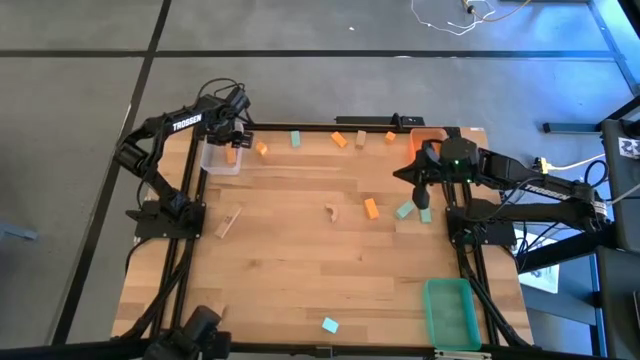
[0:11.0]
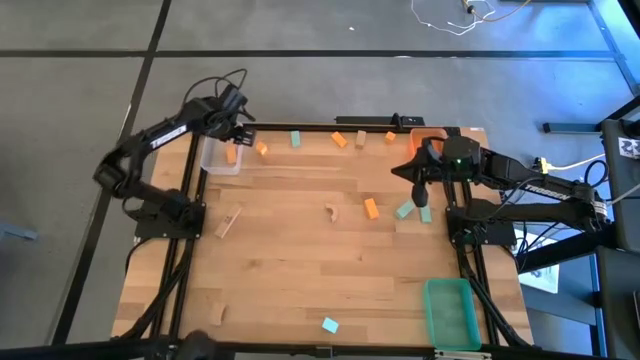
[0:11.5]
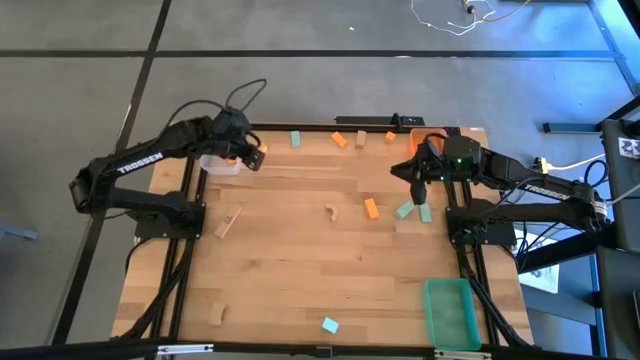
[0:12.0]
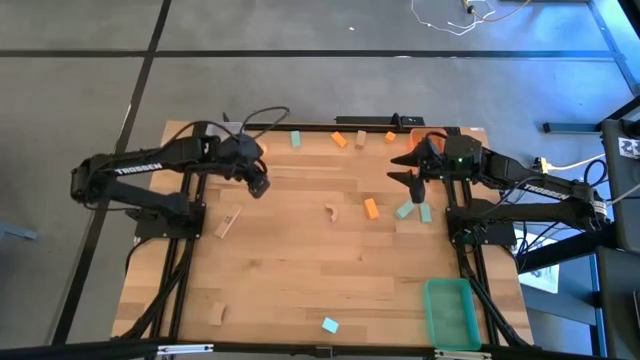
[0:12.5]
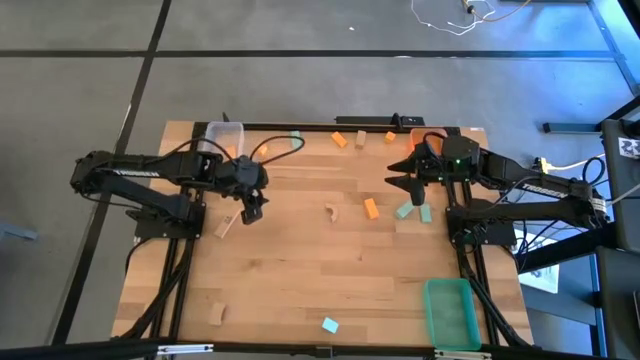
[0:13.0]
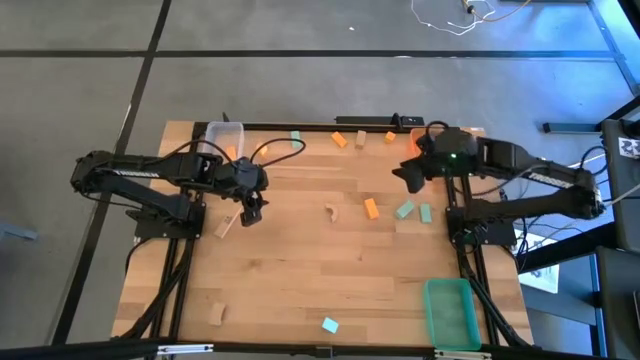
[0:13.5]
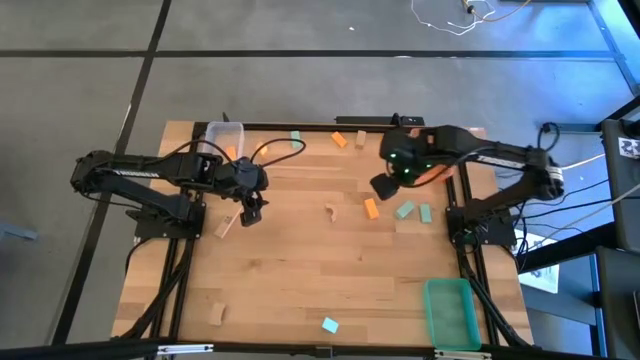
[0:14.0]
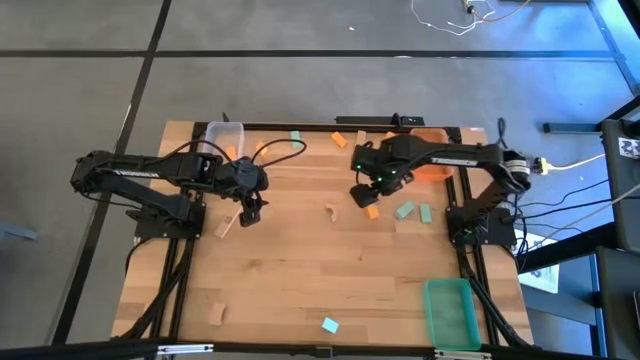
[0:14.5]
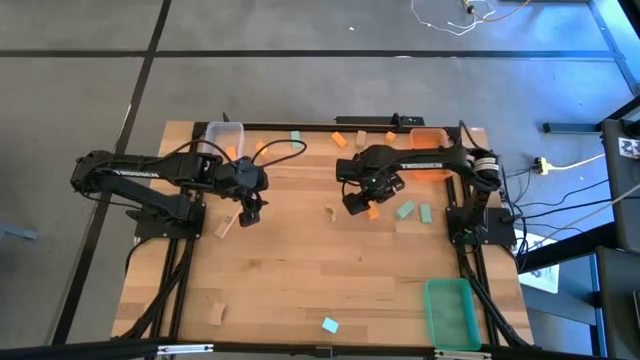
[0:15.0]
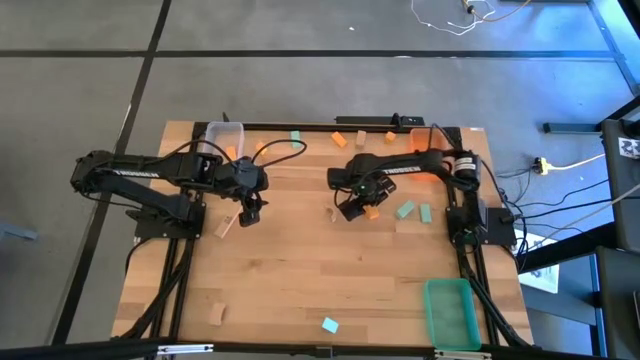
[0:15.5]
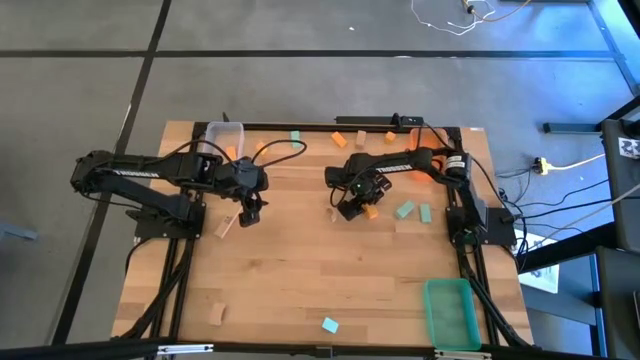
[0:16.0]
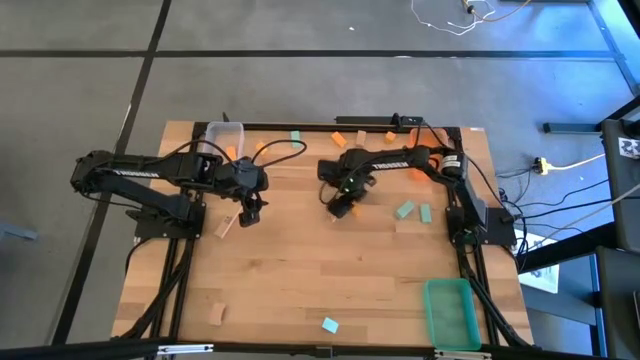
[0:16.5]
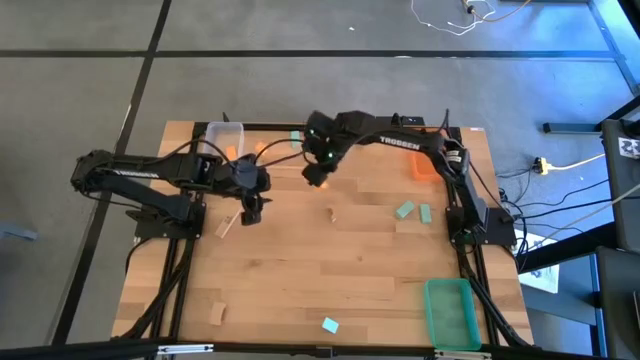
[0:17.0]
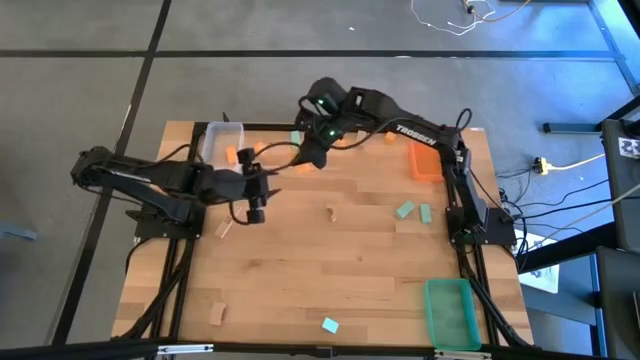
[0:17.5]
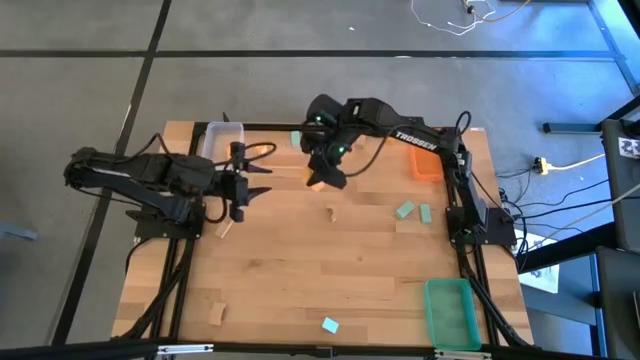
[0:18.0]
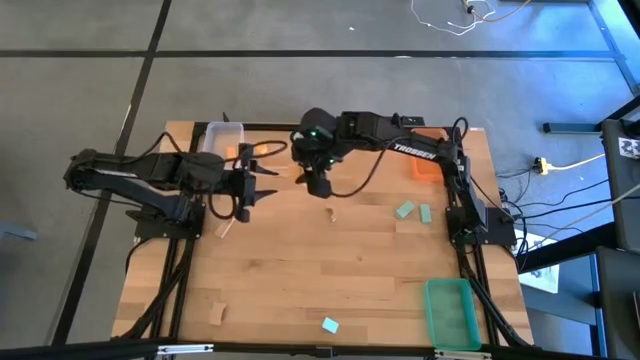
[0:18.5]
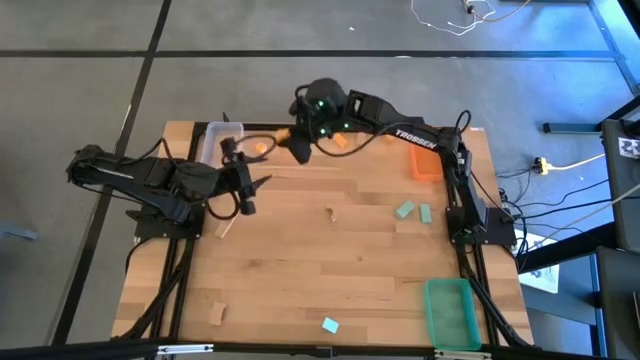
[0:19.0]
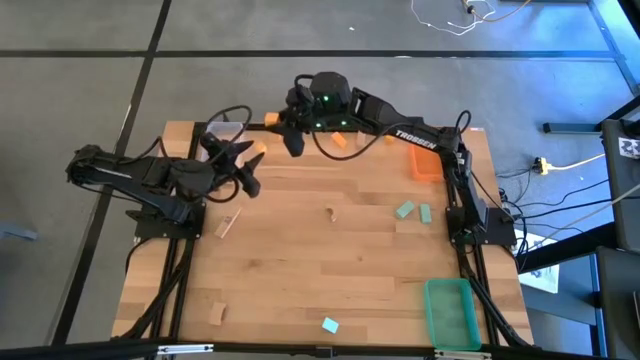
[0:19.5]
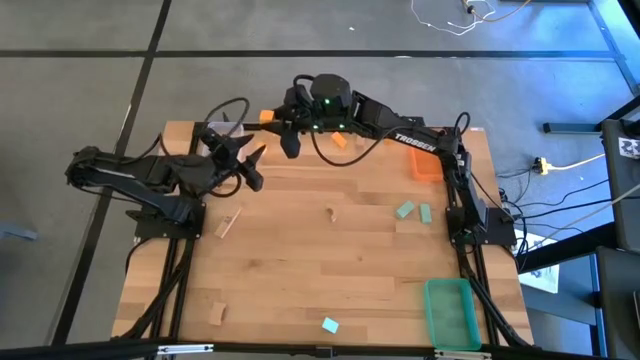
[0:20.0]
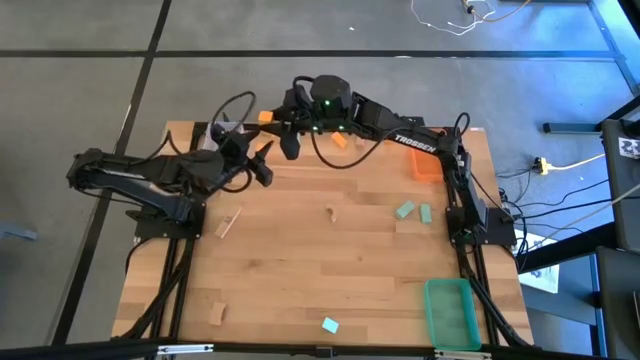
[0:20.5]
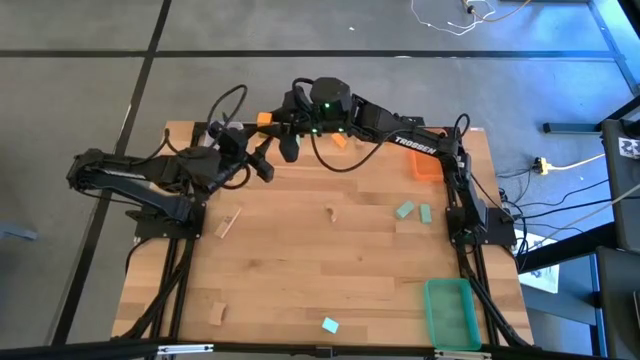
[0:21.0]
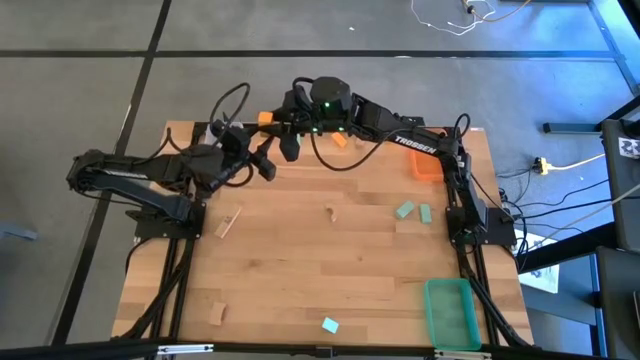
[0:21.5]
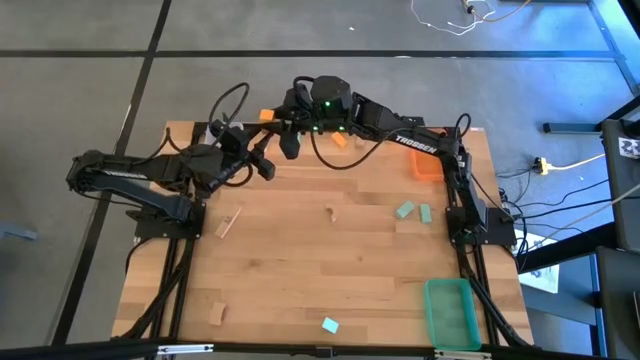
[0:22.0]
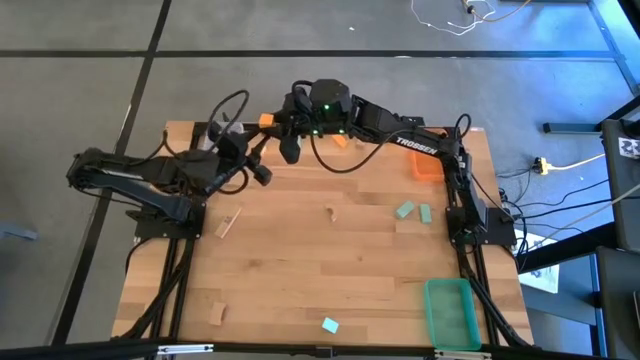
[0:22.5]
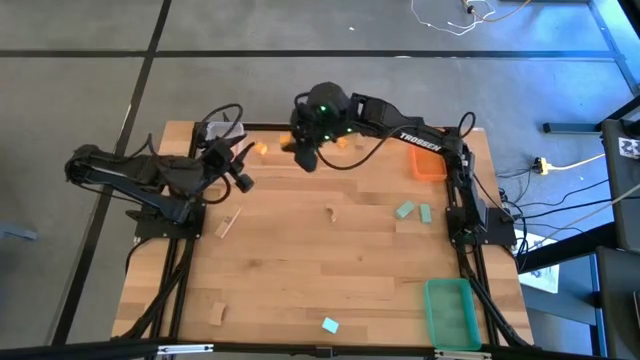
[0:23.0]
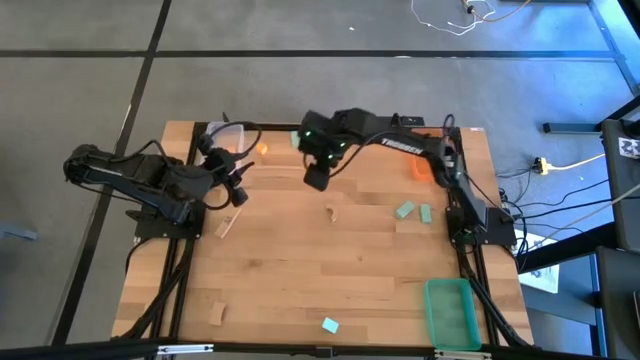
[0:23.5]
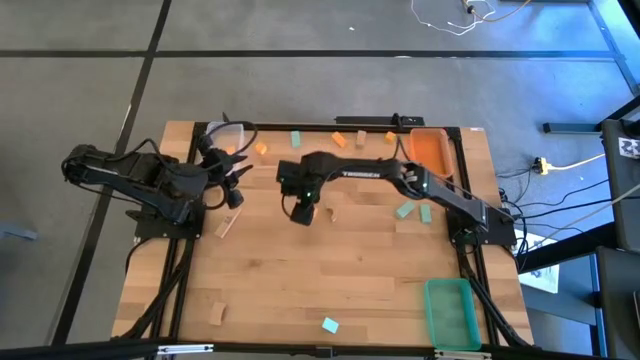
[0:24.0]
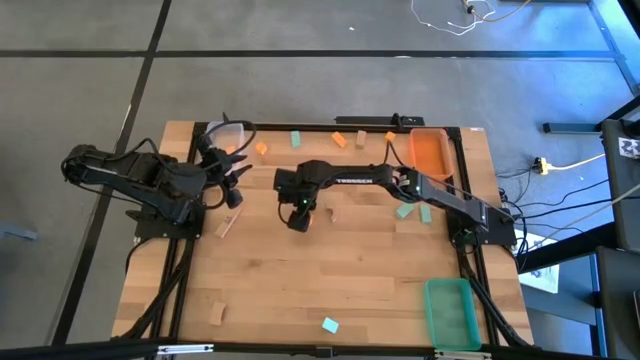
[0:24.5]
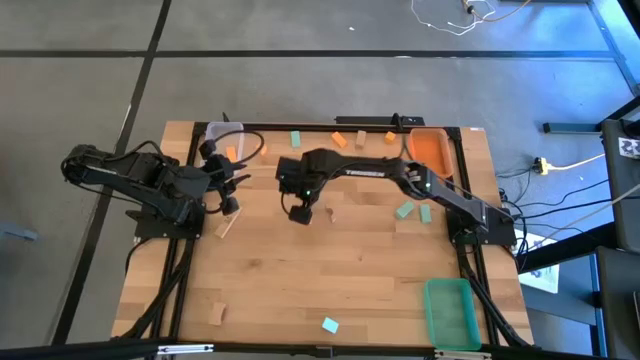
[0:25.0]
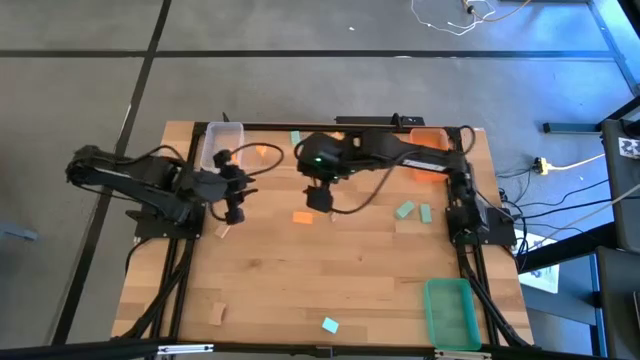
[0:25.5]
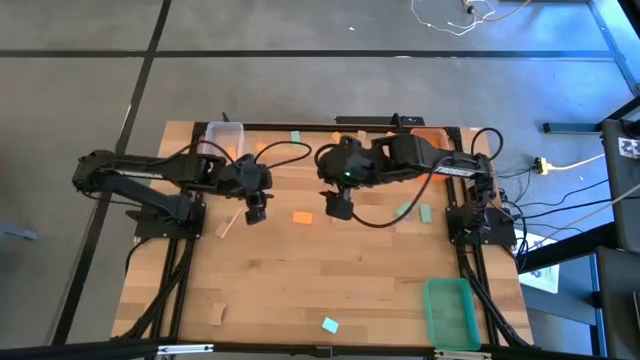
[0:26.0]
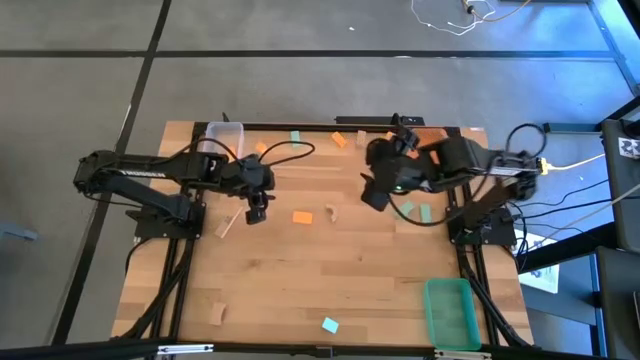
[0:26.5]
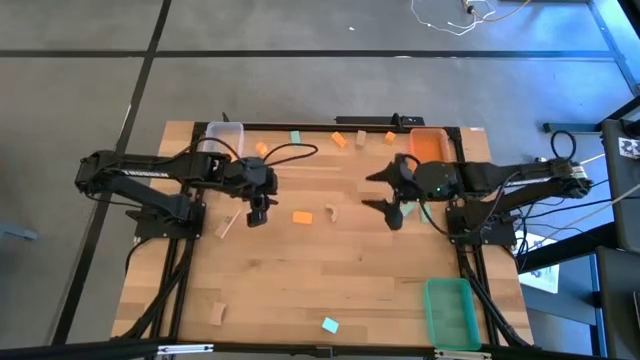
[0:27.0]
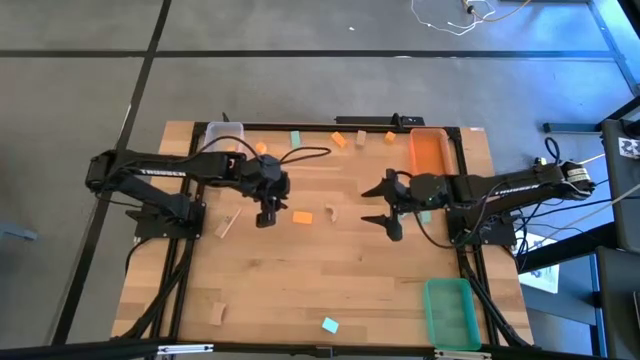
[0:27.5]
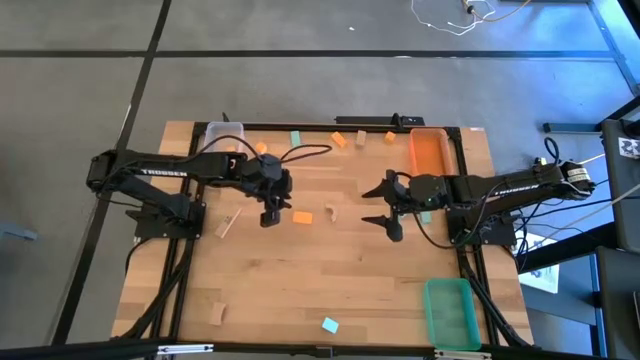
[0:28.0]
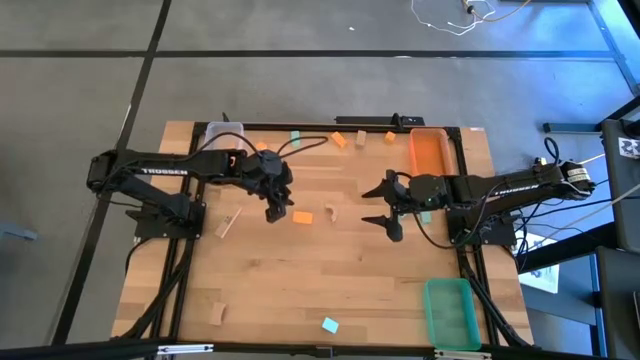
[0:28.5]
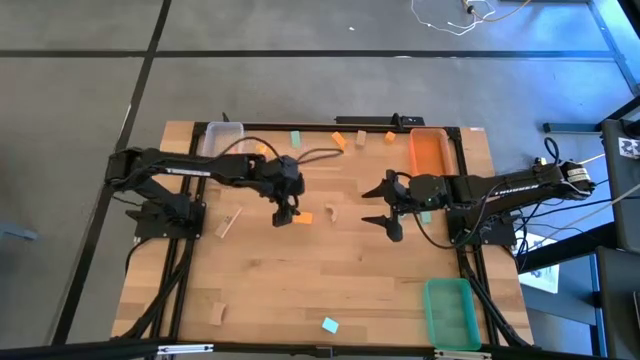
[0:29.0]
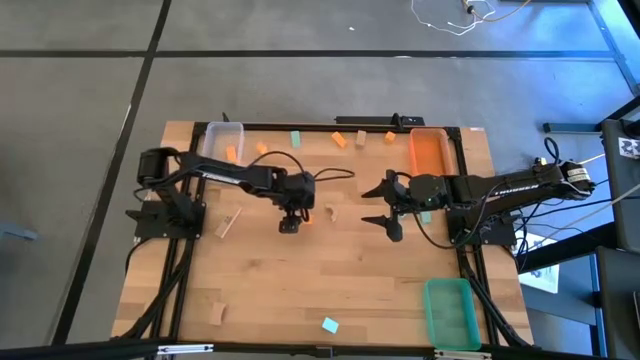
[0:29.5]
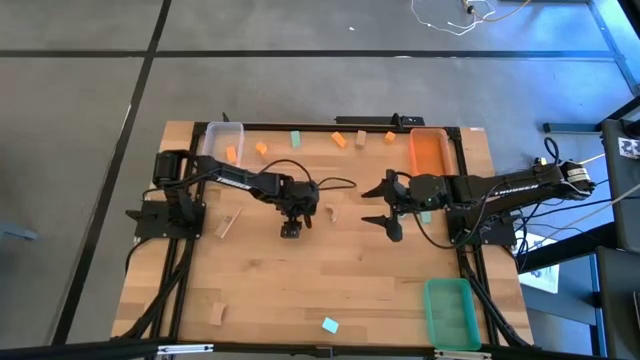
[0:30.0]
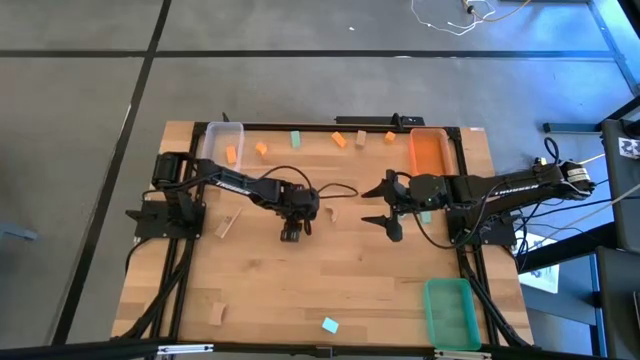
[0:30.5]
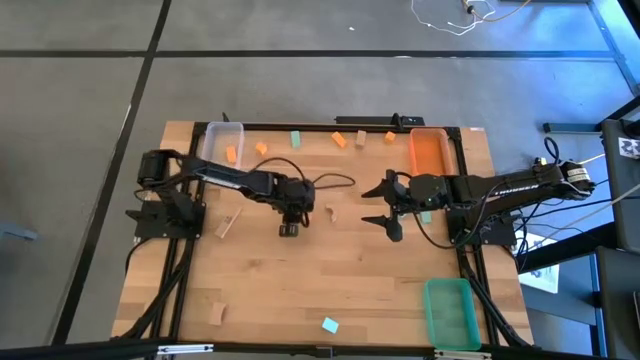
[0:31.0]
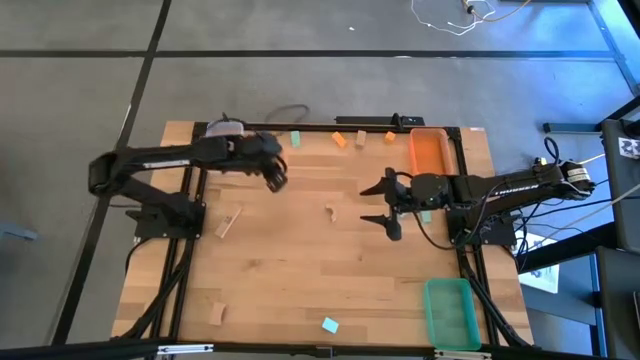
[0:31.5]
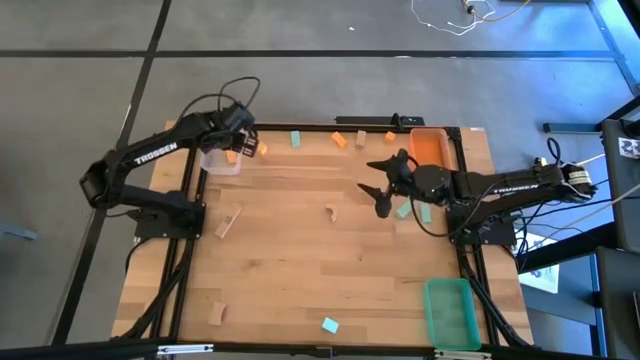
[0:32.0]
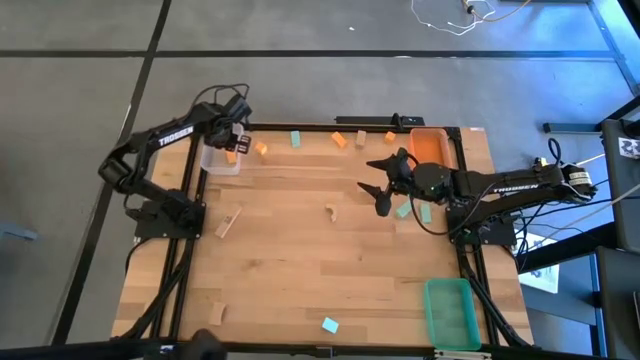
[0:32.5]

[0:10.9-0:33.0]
Task: Sort & place blocks by color
Put the orange block into the transparent bin
